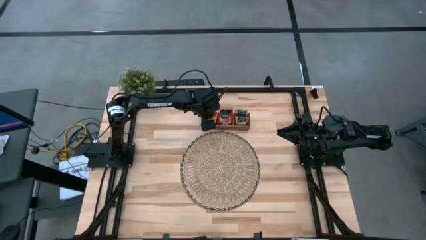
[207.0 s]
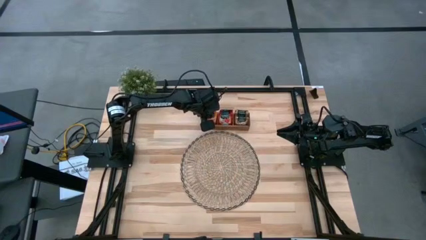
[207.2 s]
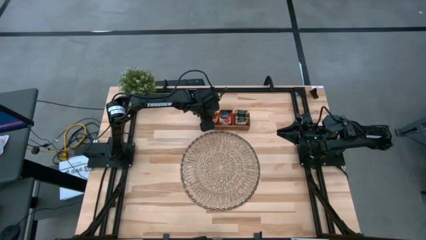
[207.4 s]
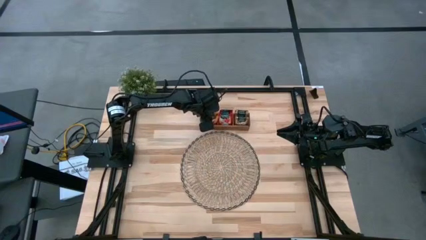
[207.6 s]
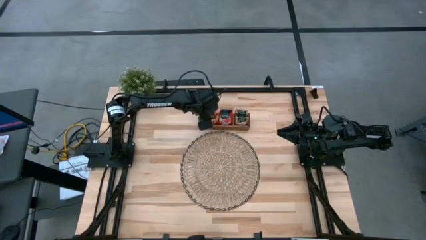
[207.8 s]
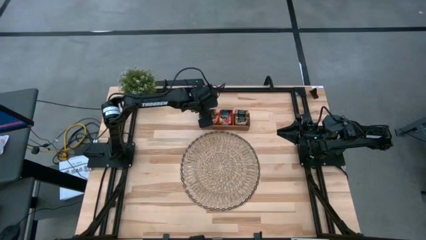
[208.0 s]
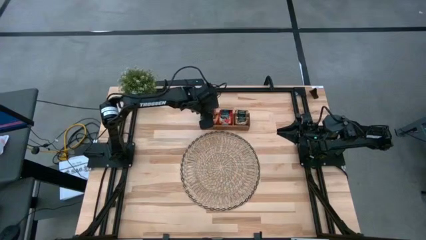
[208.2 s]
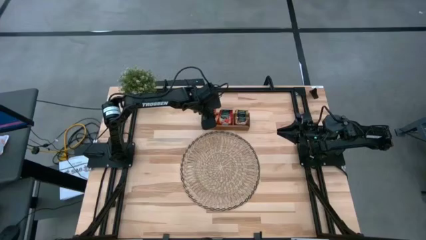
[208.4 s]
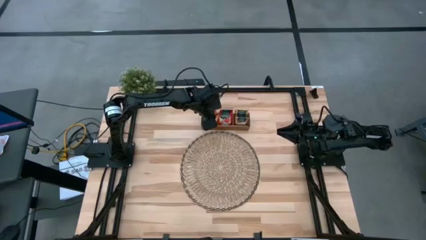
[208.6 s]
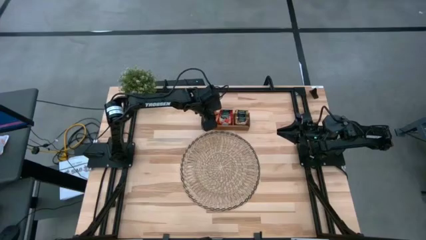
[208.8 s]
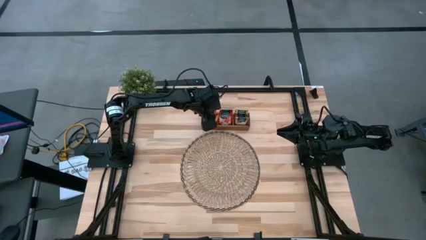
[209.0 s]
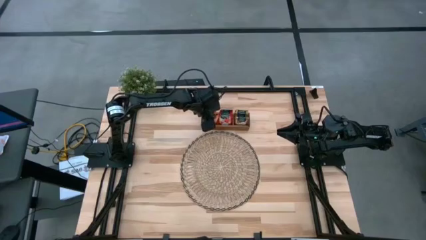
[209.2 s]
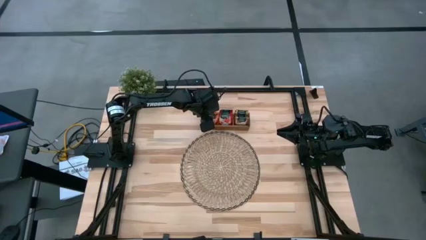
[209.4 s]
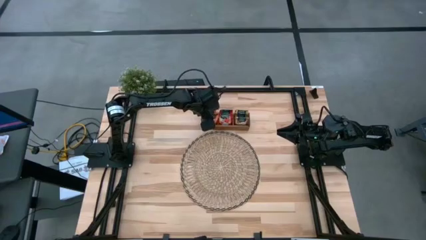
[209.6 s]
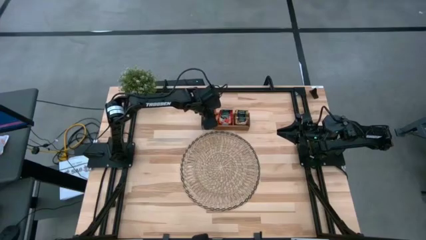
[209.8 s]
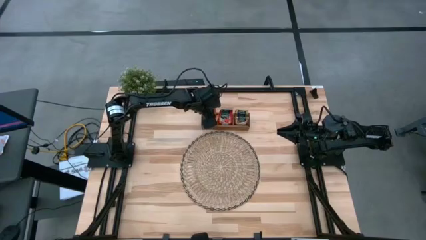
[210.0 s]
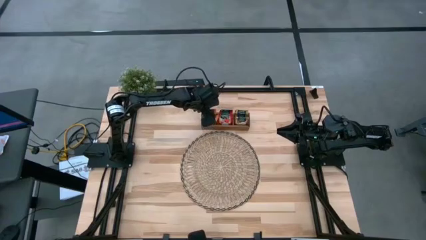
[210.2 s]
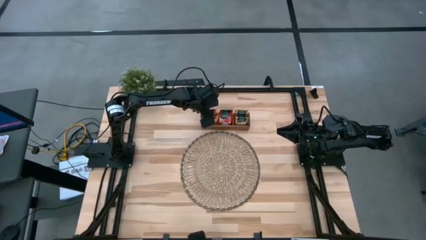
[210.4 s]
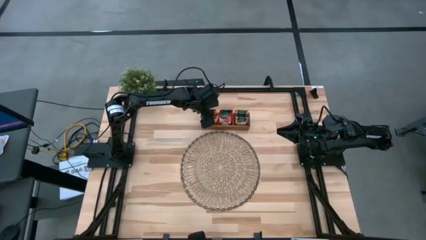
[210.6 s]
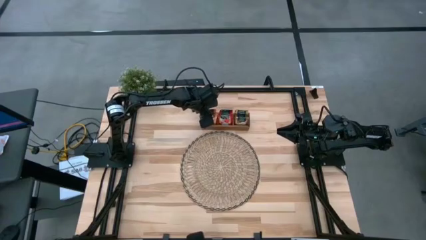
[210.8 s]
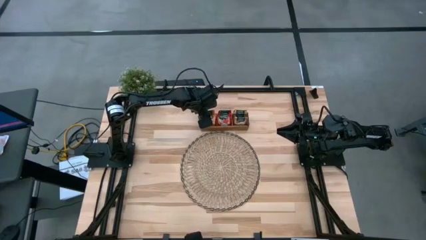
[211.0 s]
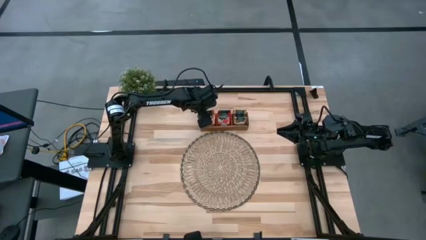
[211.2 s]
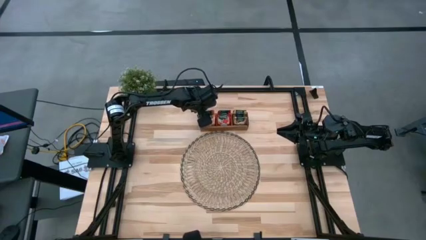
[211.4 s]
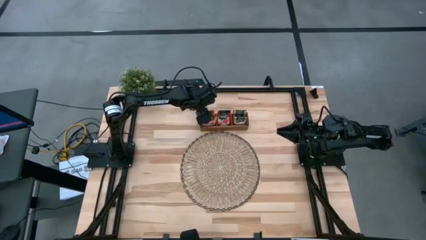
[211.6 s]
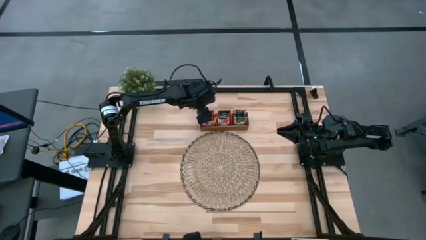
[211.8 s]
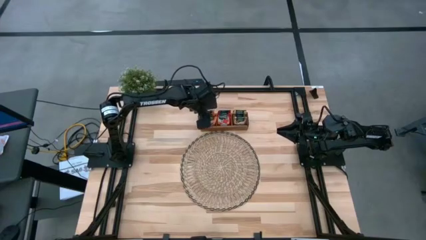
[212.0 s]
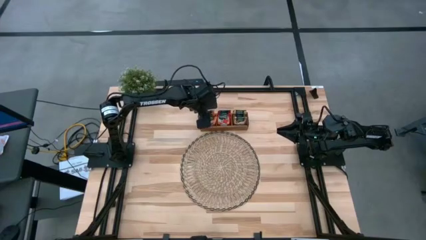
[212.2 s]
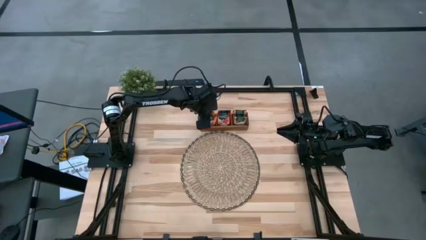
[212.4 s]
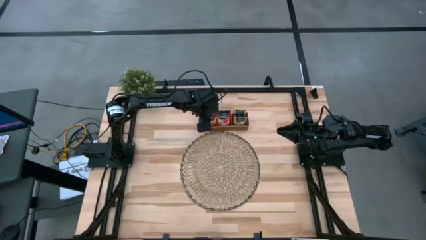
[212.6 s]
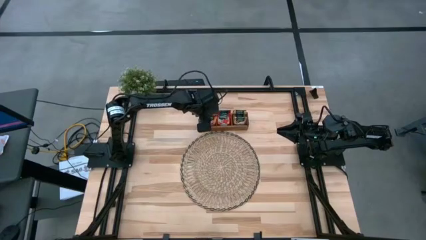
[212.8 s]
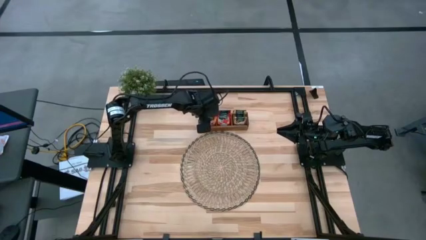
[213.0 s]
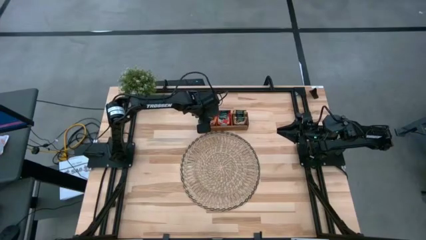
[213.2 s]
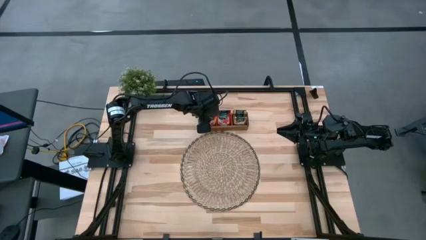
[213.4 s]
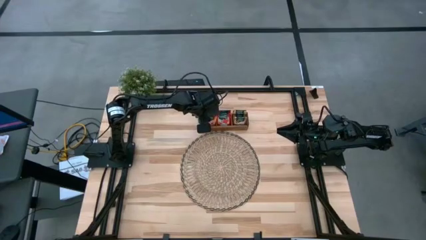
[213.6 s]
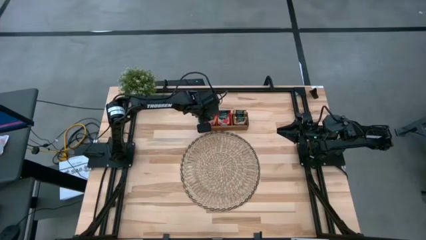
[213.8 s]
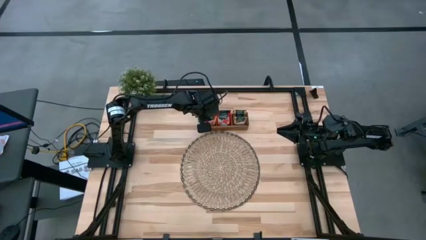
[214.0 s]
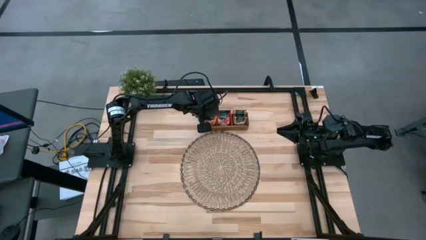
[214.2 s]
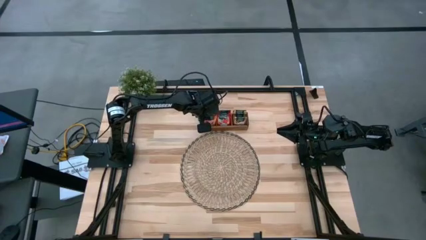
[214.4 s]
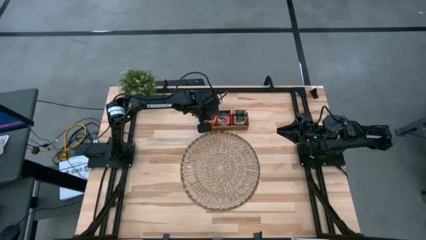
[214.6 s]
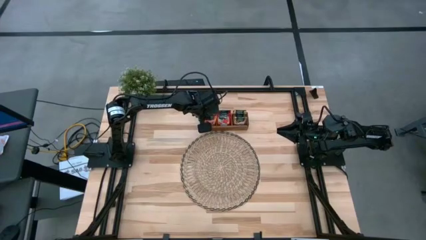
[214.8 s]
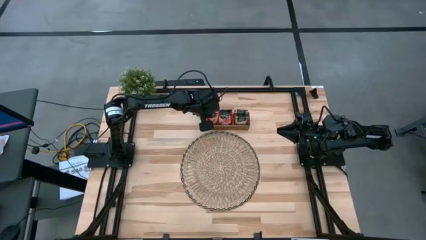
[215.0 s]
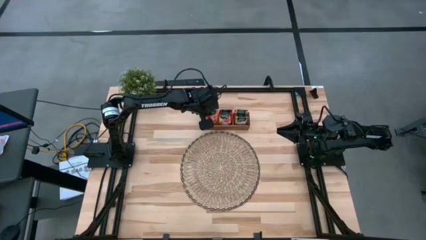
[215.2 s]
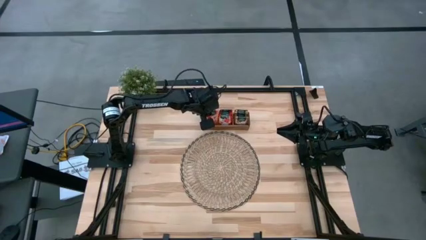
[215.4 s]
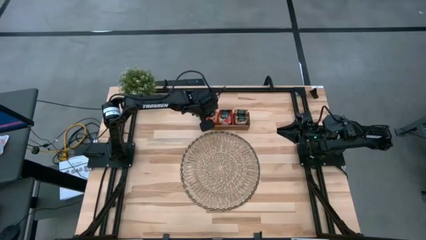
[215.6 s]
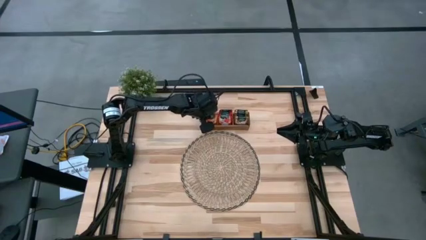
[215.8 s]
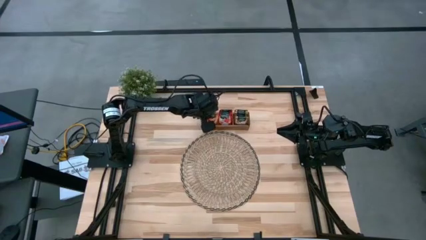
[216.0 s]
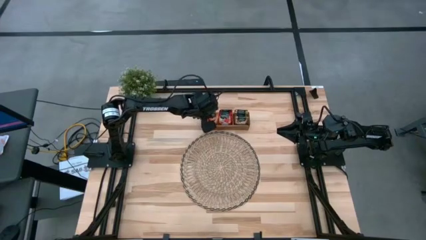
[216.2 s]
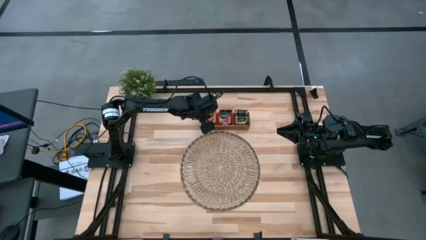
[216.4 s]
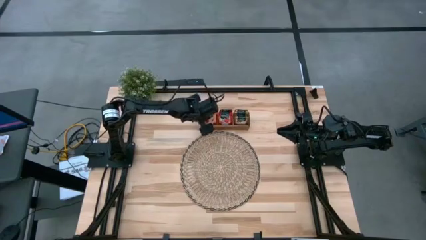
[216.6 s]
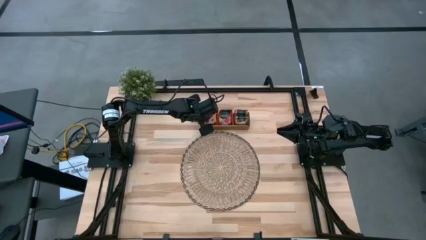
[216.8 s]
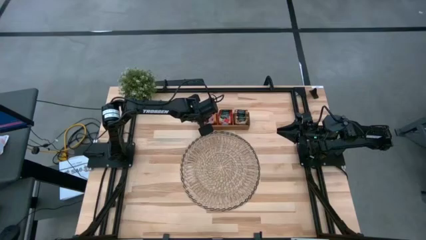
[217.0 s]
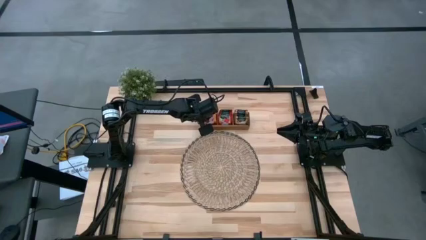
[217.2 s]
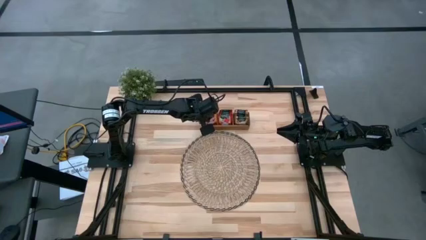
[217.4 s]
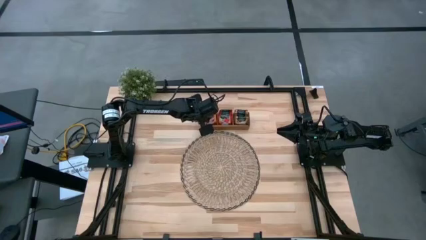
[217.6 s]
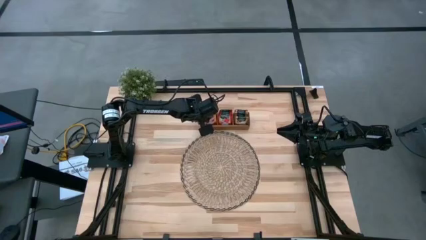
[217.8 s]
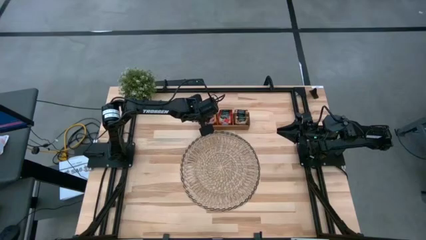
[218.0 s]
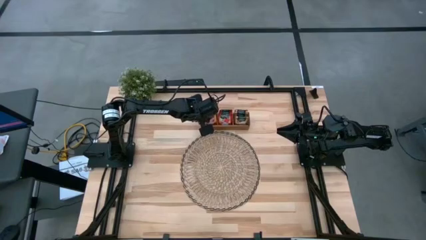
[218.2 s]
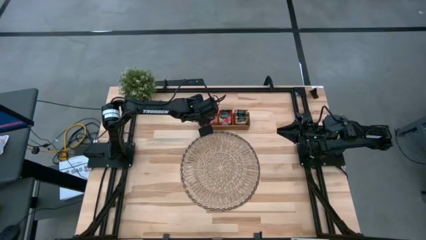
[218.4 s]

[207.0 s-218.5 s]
Task: Pick & Place Tea
Put the orange tea bag into the left section of the wooden organizer

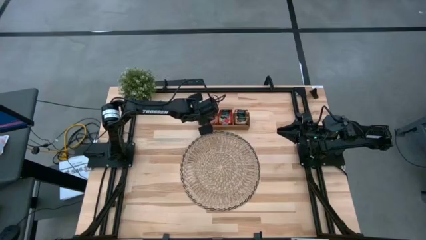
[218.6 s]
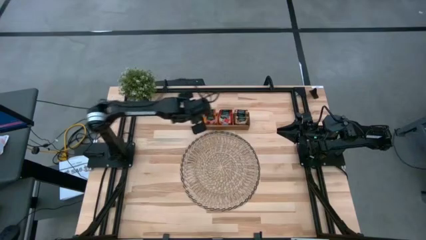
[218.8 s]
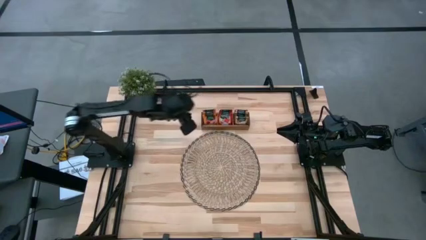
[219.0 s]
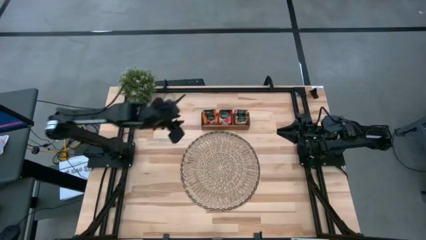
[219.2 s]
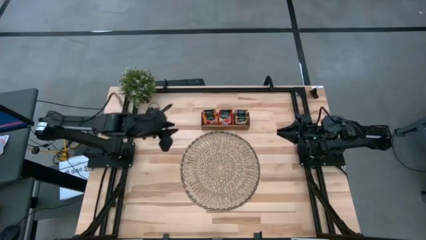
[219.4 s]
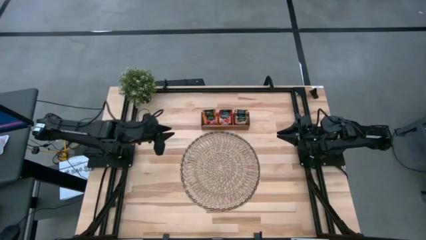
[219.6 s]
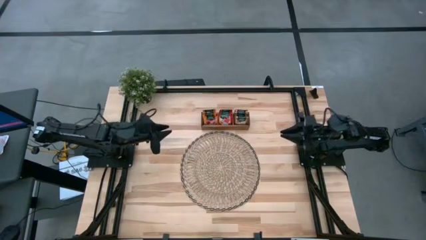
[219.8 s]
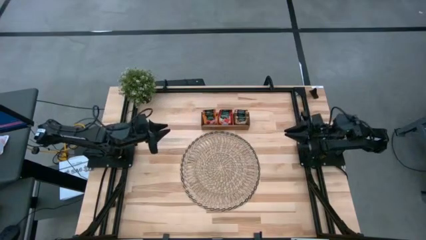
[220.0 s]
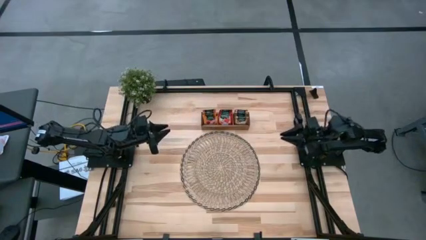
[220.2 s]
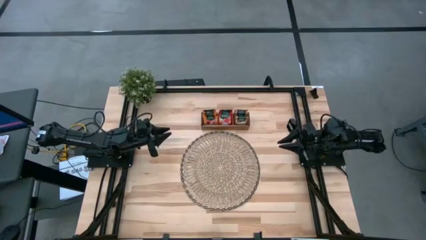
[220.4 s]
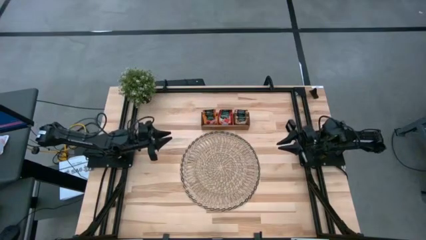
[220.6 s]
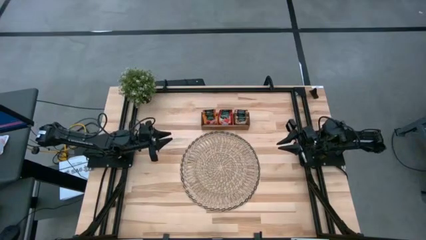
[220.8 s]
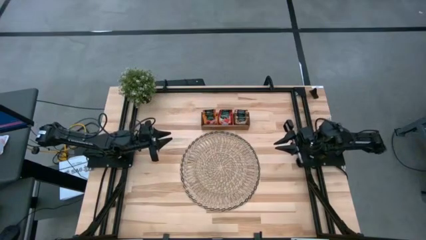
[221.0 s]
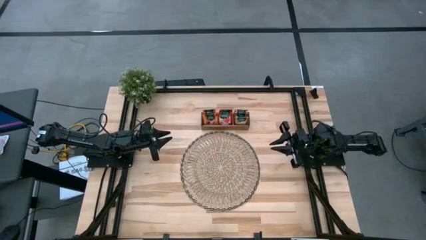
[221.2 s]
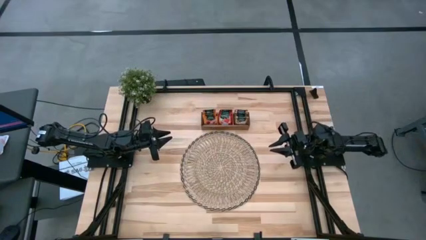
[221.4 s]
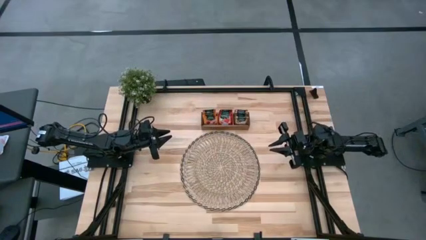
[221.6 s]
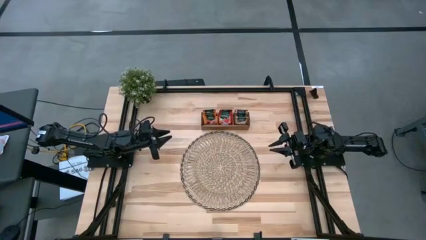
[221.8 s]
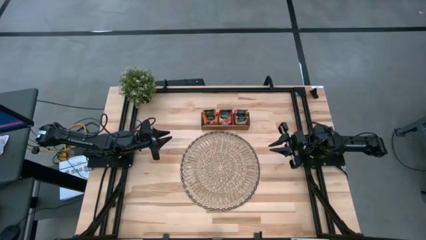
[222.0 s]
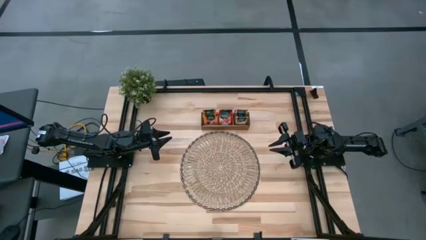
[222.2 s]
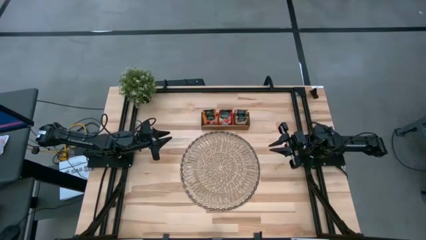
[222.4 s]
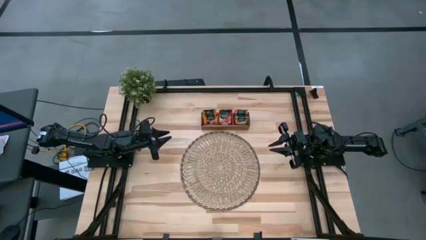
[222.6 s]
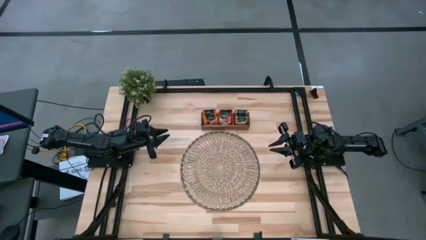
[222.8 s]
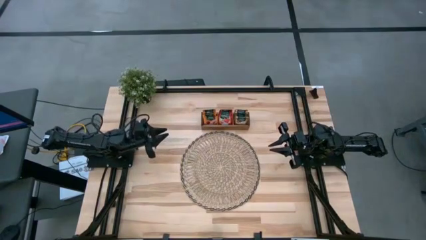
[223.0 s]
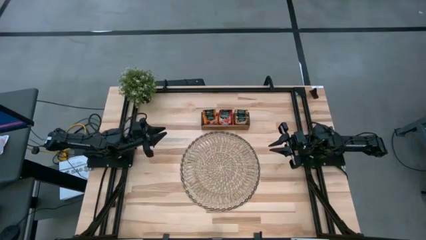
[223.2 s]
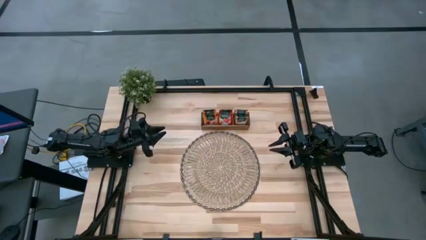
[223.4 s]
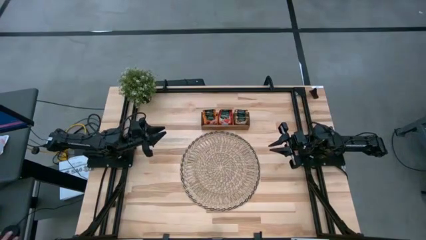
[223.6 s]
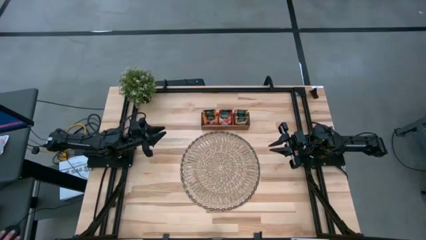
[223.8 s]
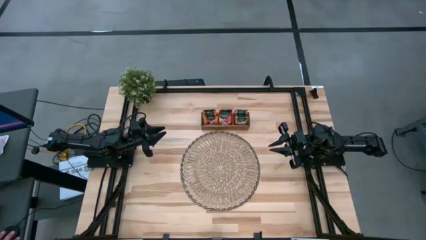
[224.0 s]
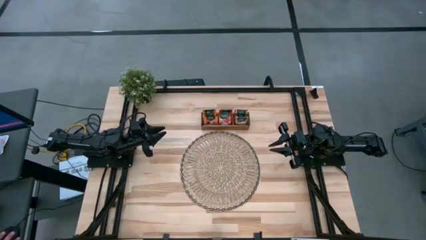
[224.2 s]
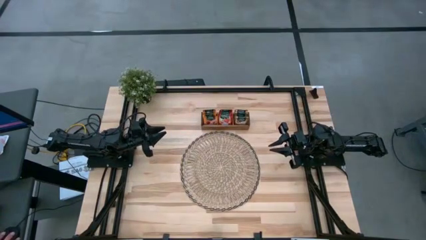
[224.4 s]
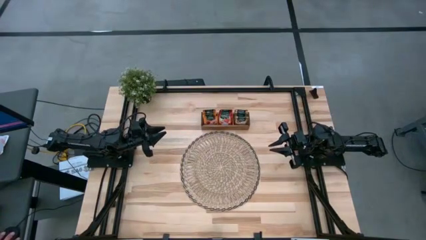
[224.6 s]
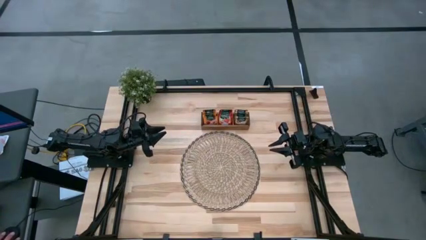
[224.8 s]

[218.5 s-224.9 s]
Return to Home Position
